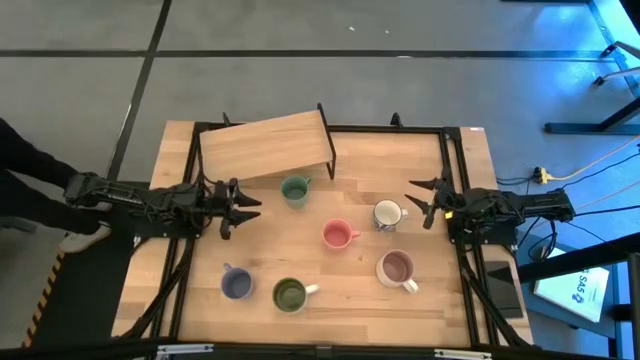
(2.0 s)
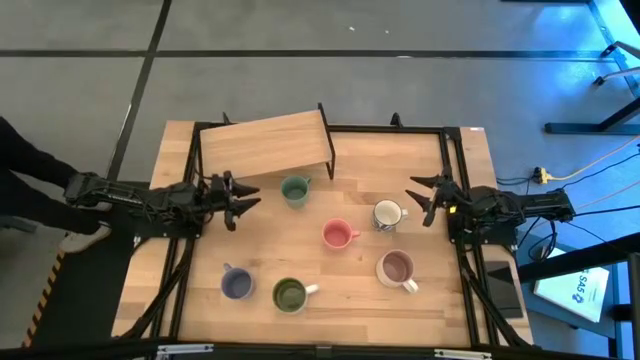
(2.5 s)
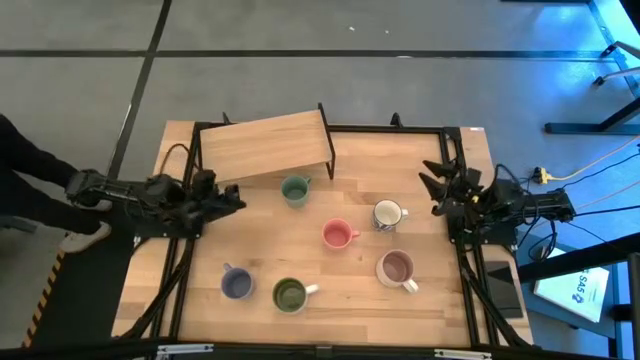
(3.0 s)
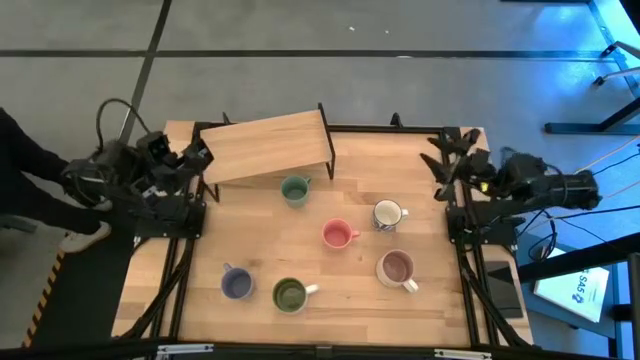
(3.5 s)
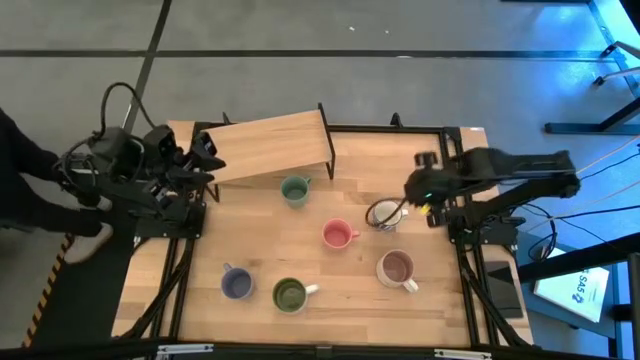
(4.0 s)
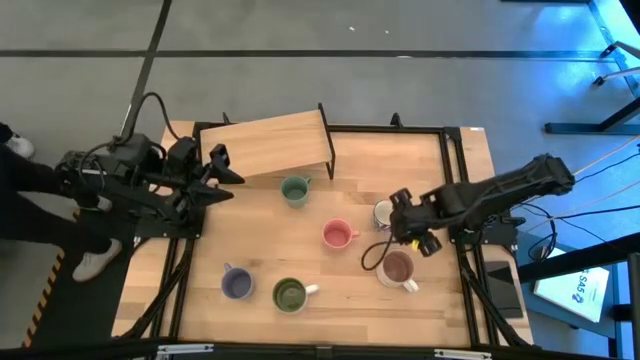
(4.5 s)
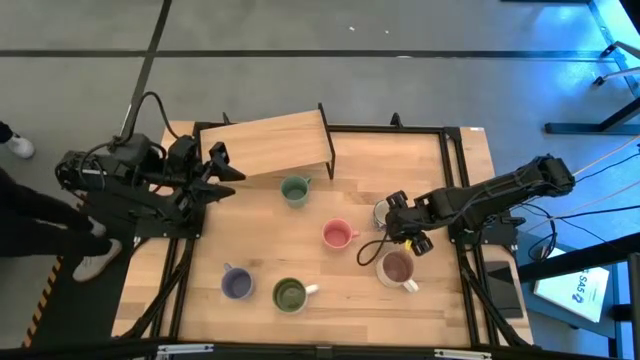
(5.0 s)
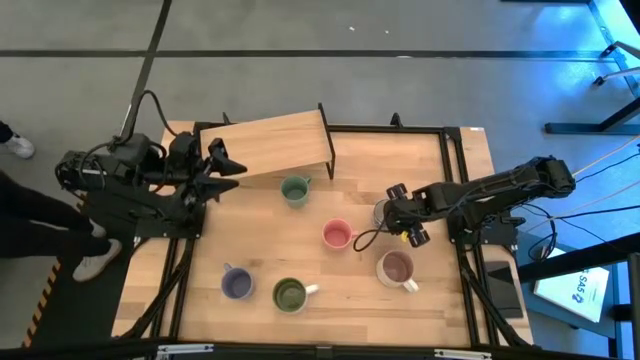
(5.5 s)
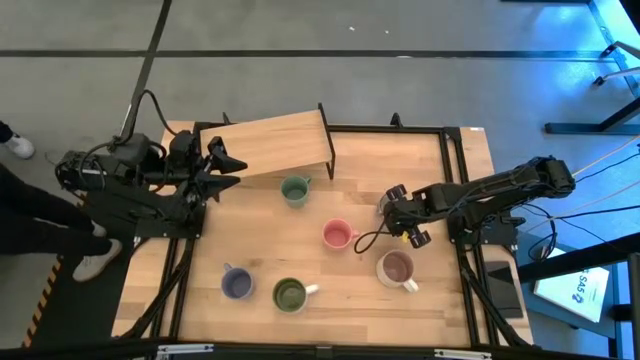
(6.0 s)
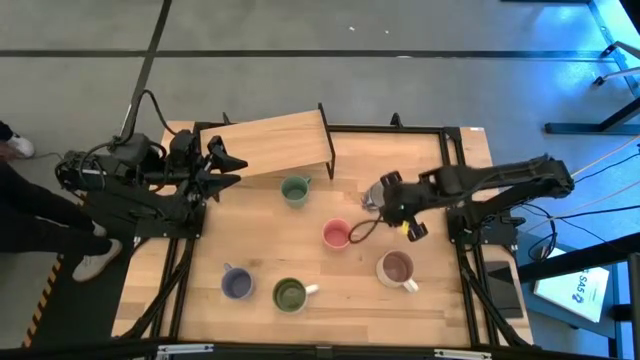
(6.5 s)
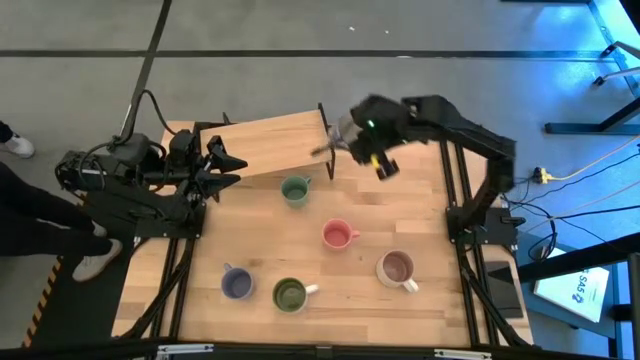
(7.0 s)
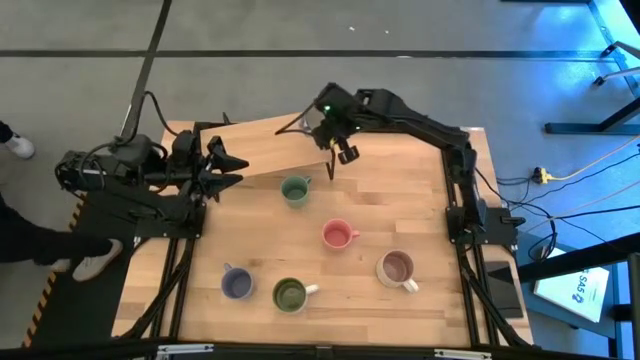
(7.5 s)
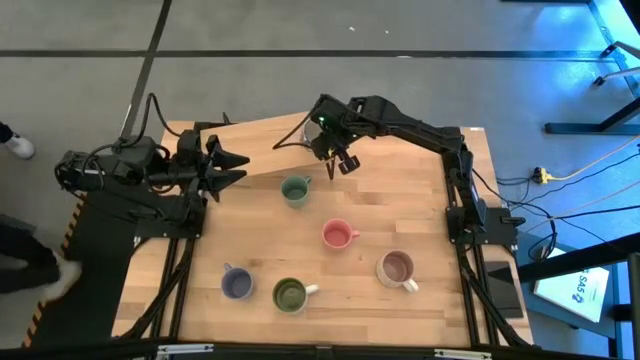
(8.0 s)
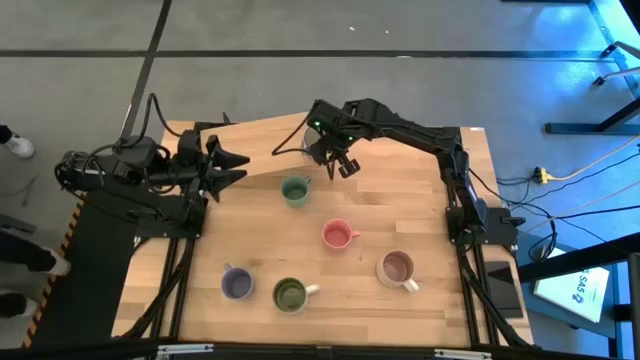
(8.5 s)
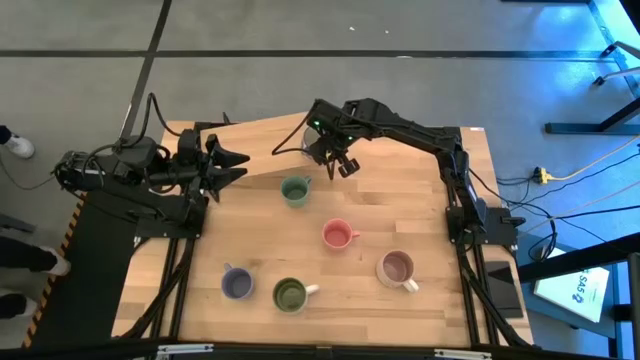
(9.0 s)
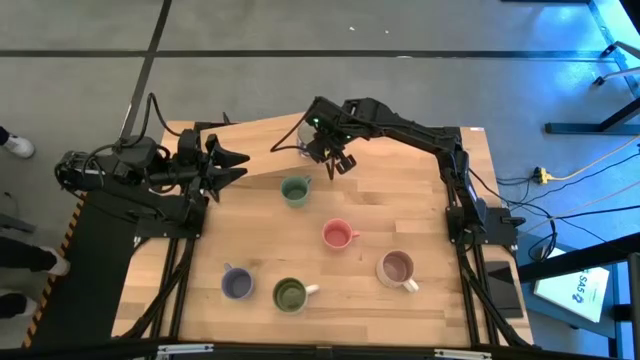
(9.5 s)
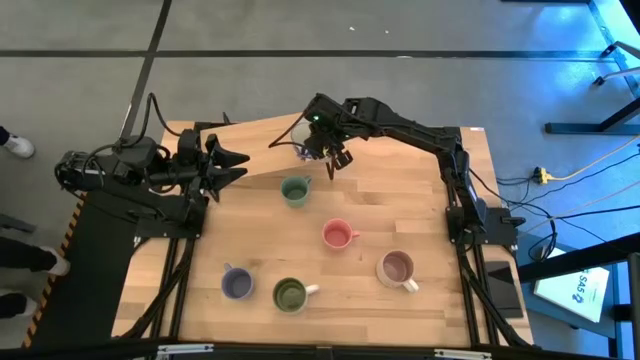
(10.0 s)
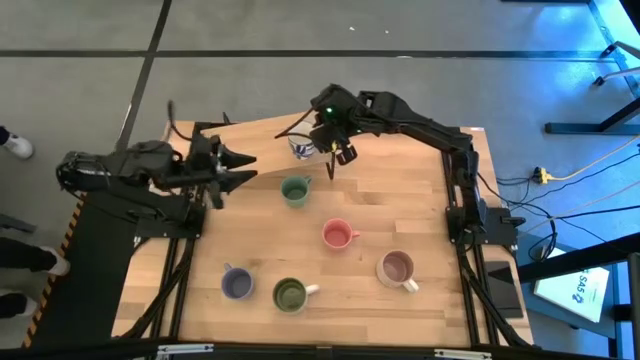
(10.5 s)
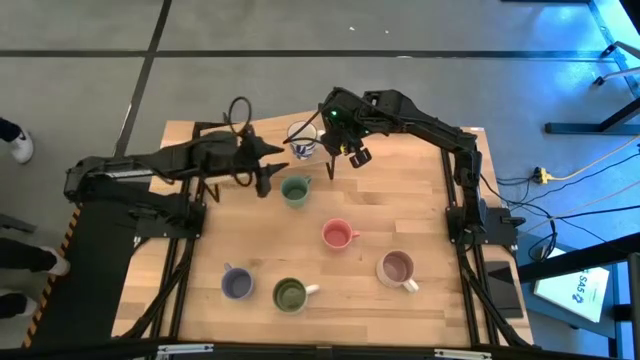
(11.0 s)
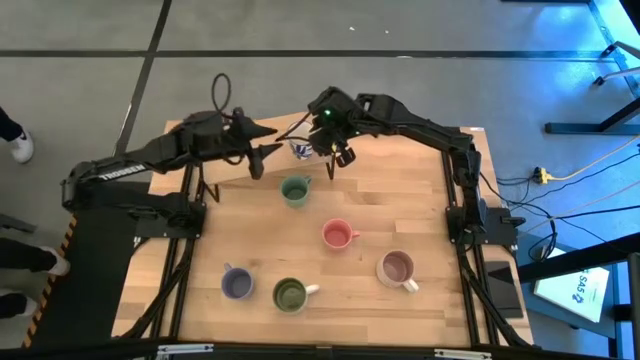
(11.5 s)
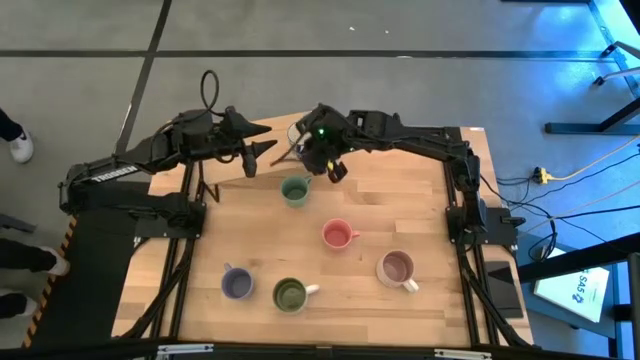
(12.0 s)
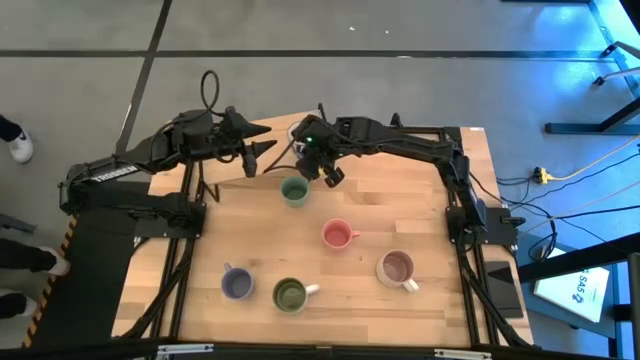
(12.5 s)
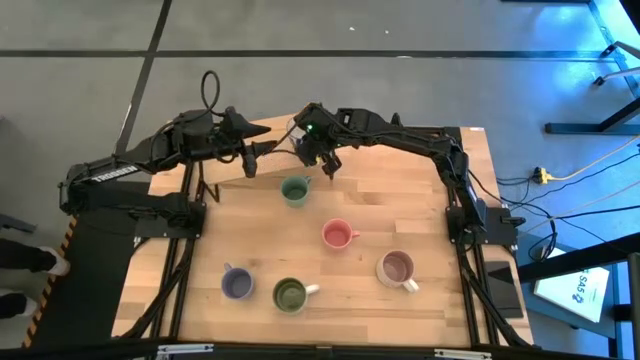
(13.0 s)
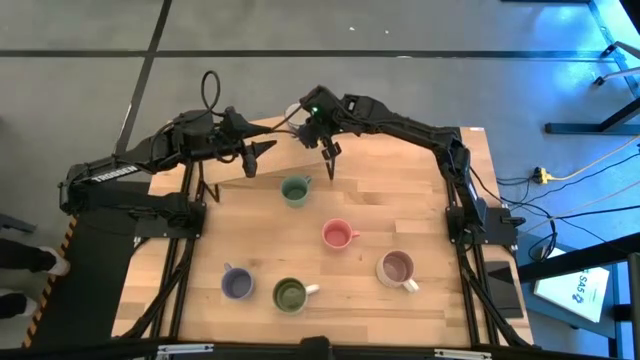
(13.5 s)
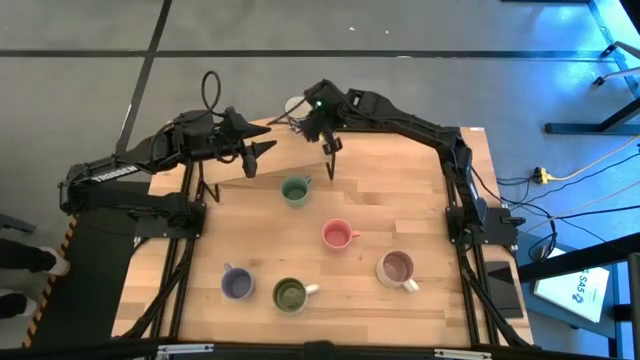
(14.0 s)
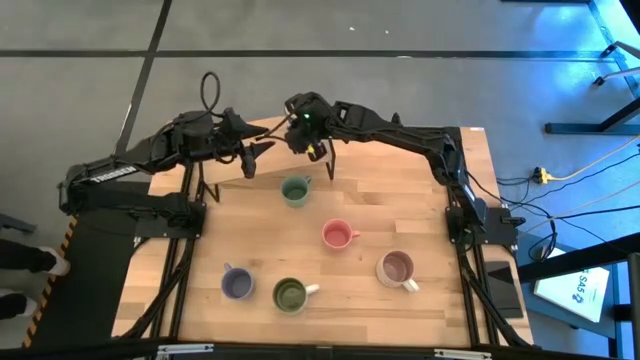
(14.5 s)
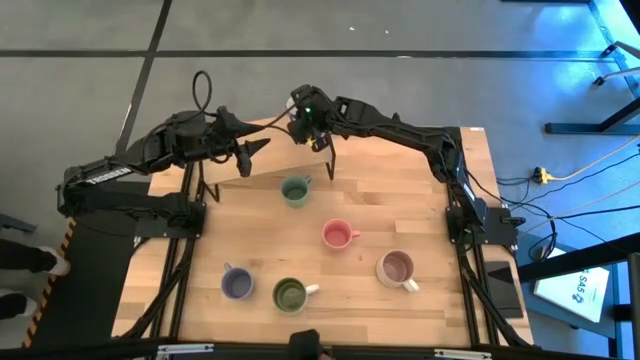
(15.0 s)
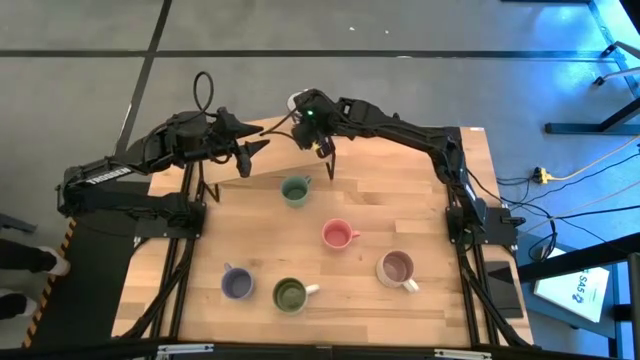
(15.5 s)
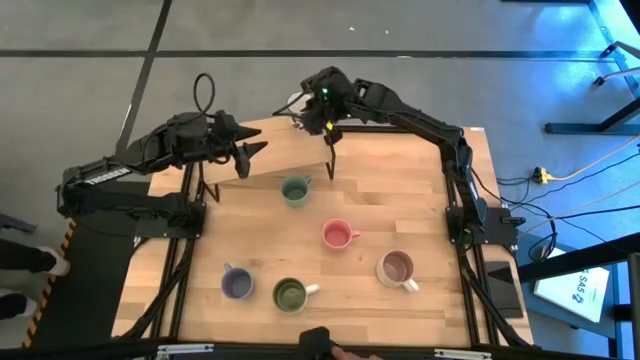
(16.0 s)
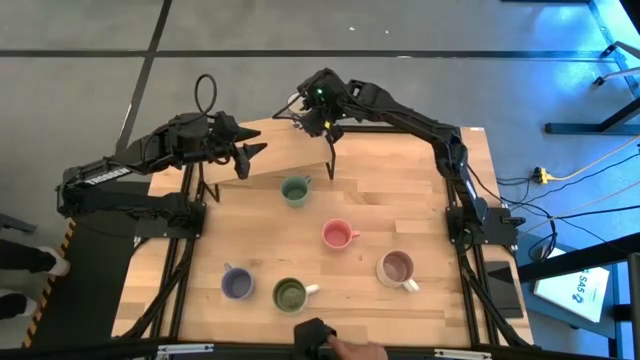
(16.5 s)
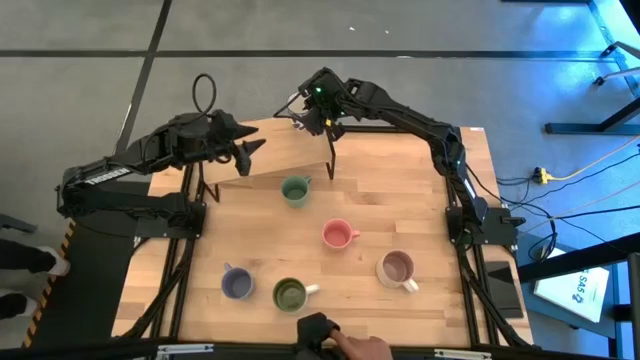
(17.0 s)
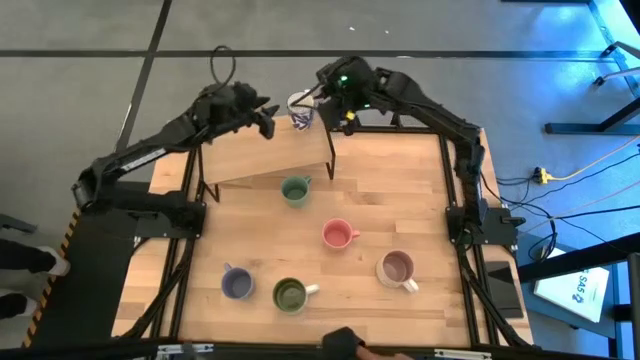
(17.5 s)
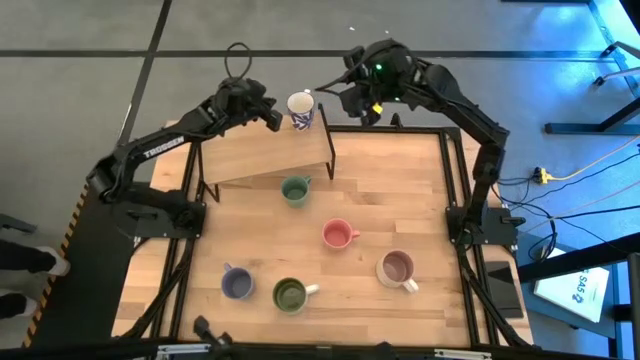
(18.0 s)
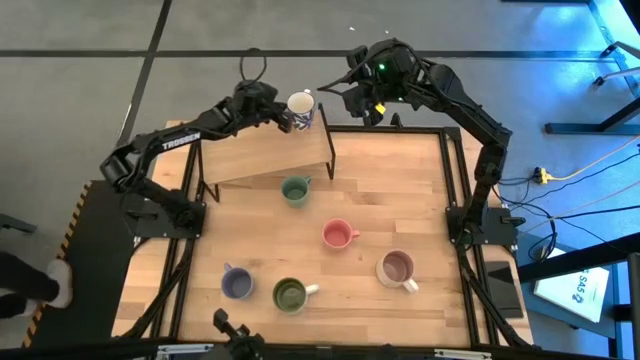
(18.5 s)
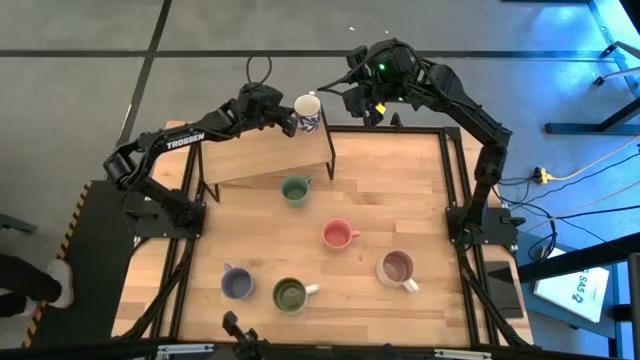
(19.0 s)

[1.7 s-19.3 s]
Task: Place coffee mugs
Put the blue patterned mug on the shelf

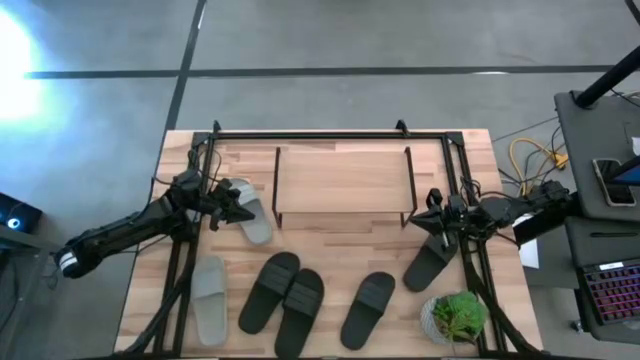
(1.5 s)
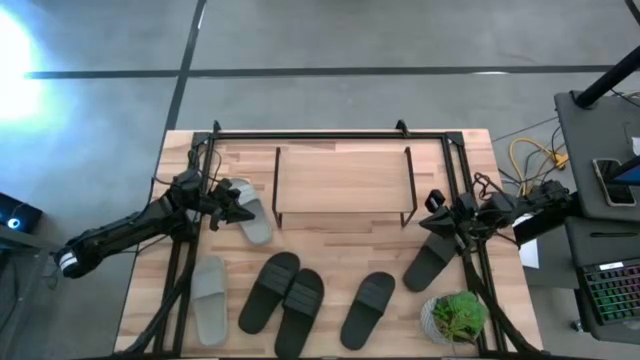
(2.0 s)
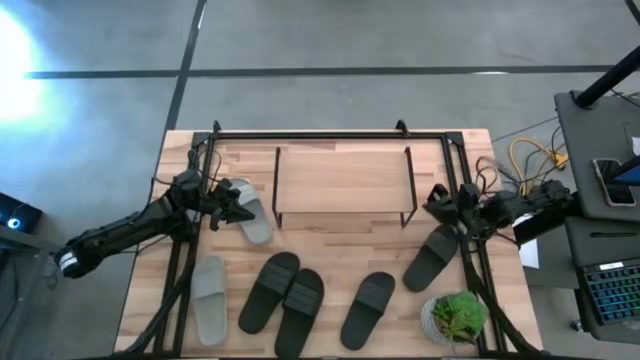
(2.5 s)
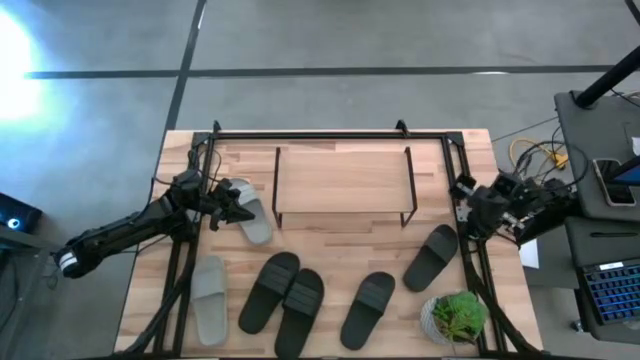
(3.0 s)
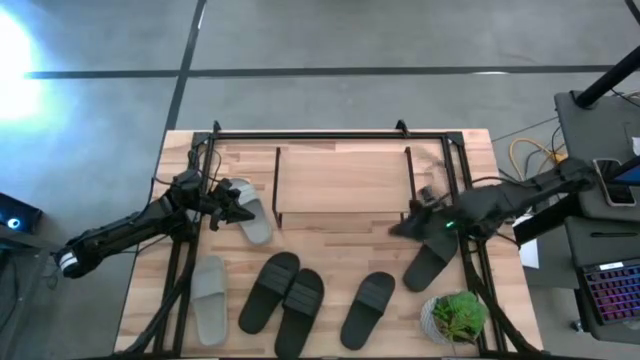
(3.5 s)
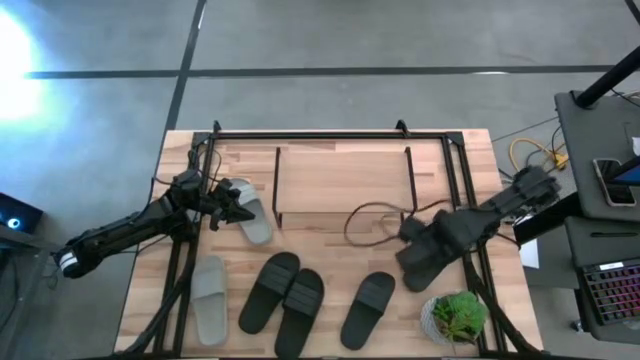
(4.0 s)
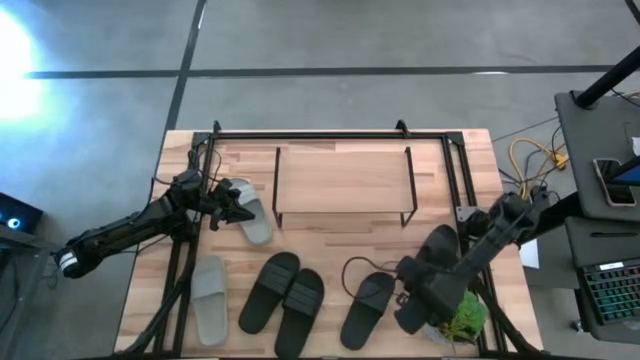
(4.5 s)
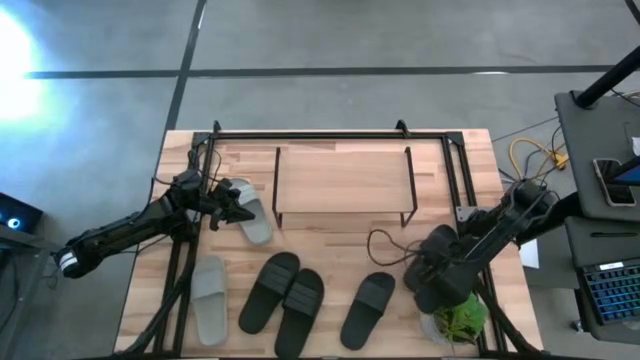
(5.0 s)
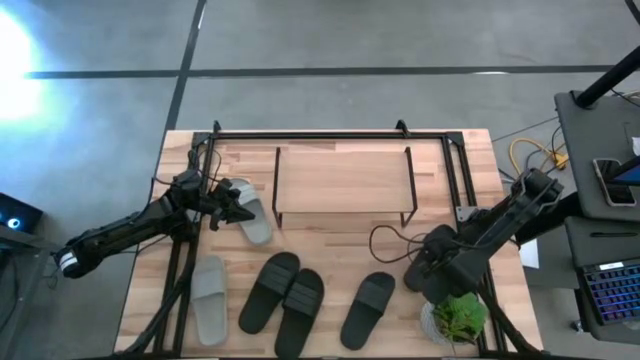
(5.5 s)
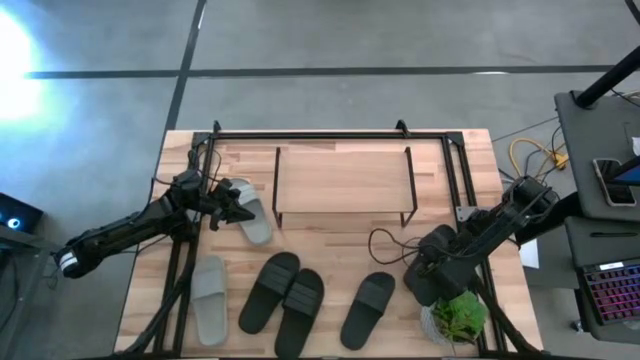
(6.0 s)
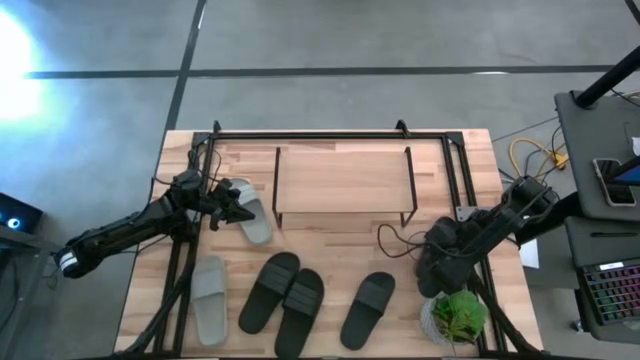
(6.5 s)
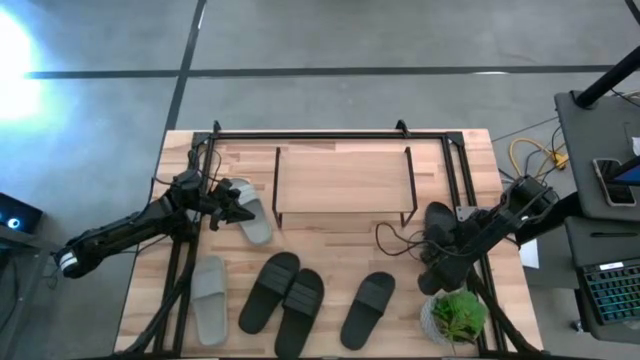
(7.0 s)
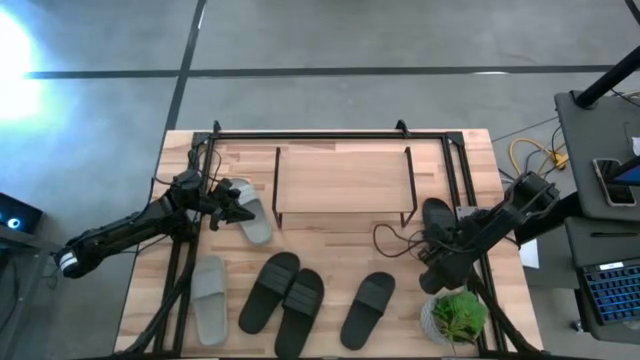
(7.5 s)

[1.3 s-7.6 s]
Task: Pick and place slides into the shelf
Put the black slipper under the shelf
